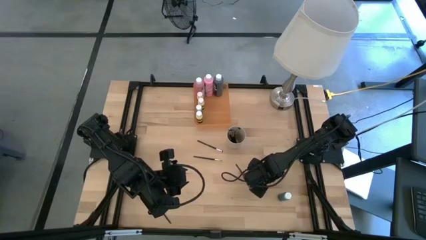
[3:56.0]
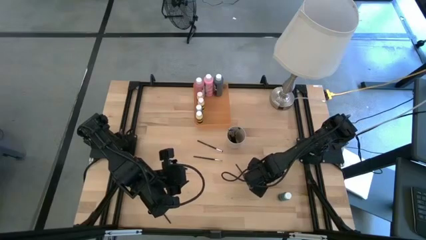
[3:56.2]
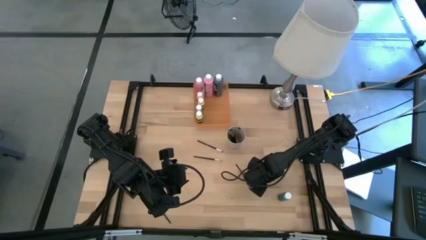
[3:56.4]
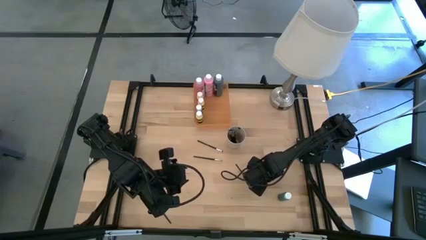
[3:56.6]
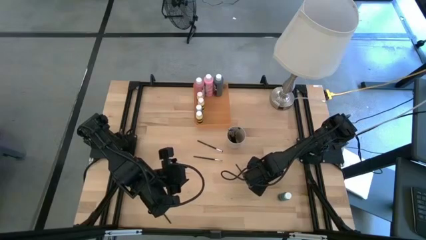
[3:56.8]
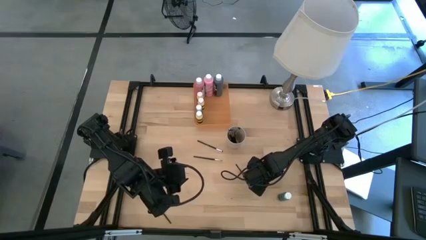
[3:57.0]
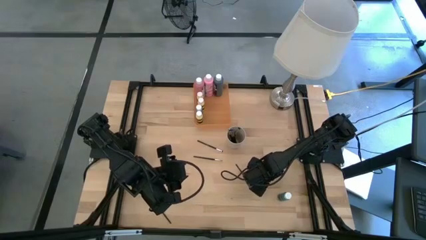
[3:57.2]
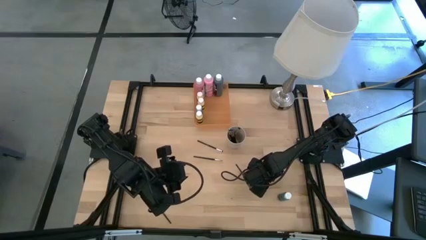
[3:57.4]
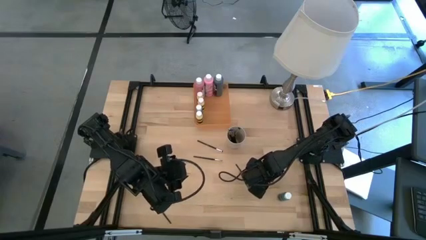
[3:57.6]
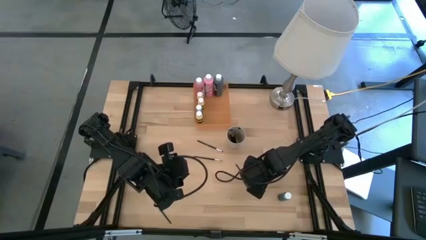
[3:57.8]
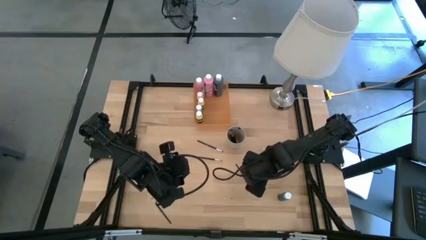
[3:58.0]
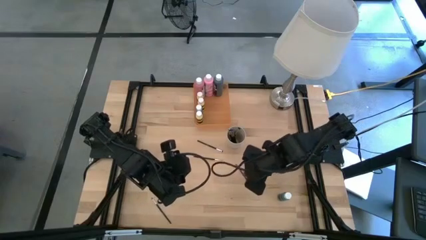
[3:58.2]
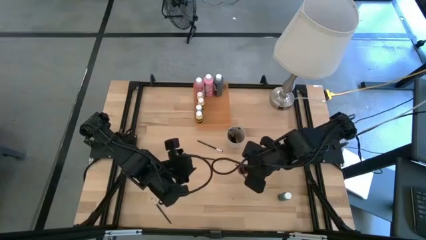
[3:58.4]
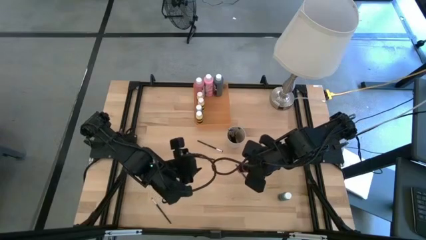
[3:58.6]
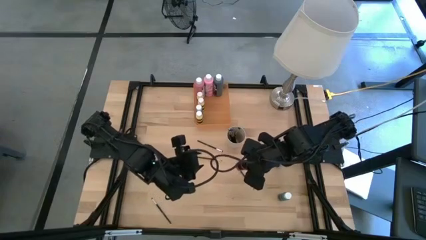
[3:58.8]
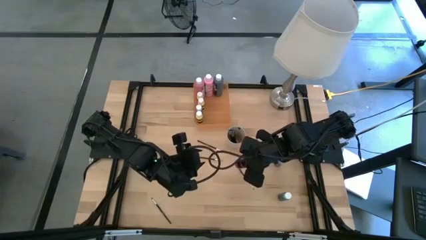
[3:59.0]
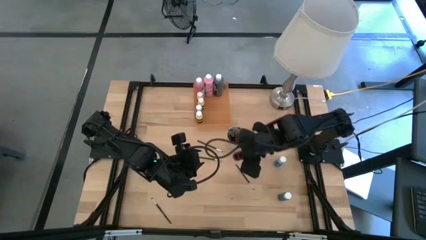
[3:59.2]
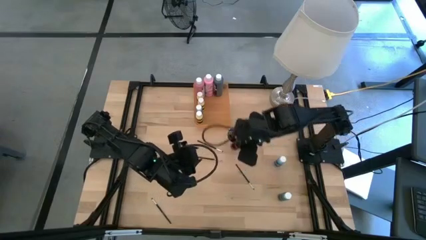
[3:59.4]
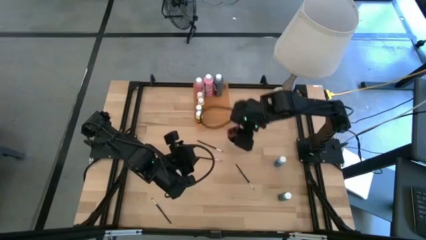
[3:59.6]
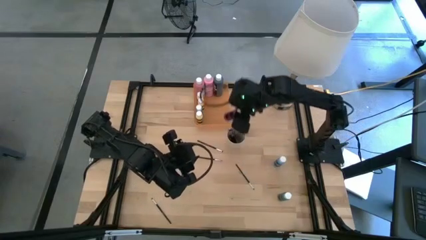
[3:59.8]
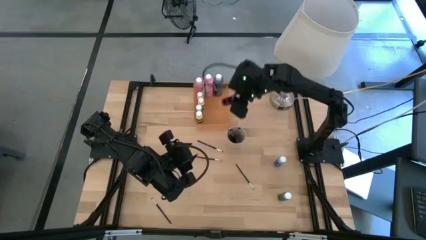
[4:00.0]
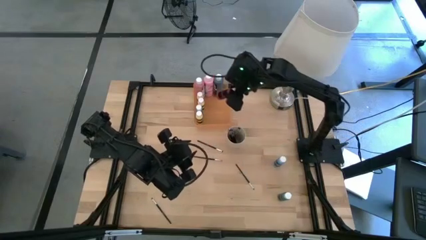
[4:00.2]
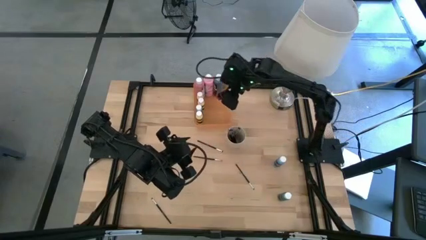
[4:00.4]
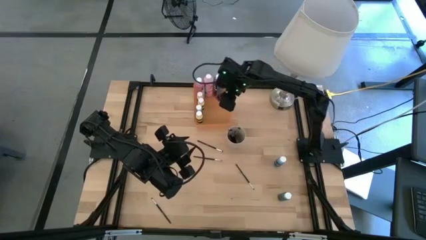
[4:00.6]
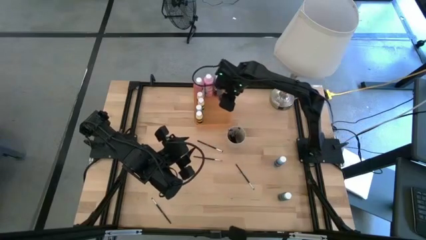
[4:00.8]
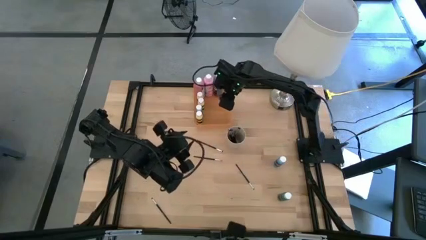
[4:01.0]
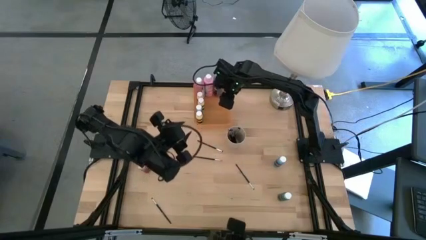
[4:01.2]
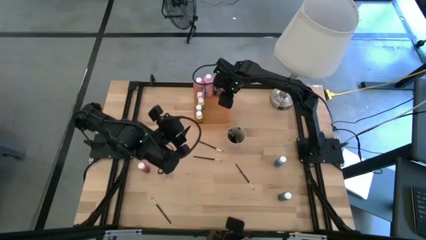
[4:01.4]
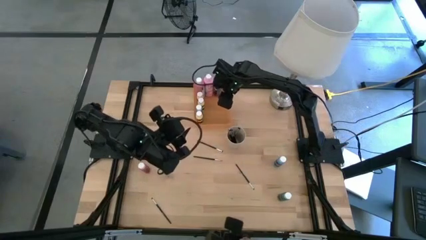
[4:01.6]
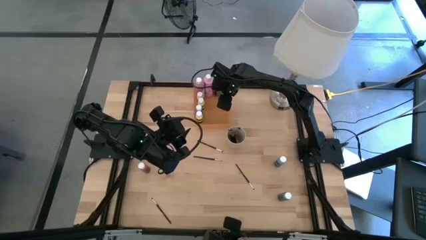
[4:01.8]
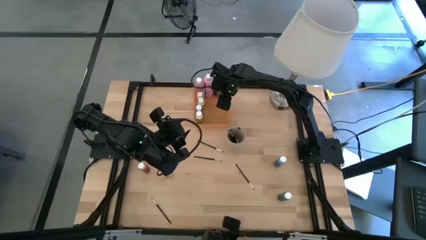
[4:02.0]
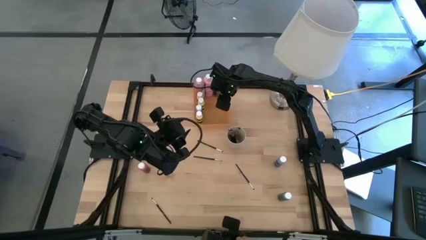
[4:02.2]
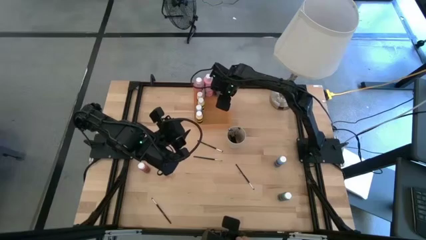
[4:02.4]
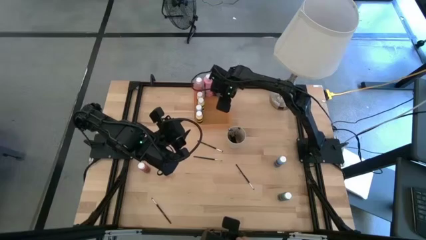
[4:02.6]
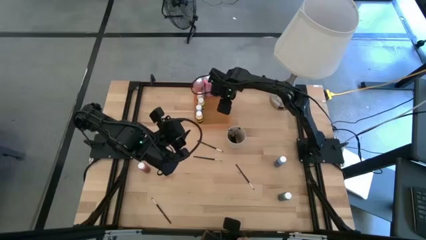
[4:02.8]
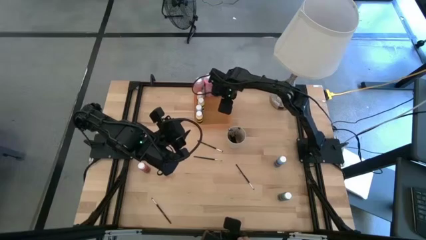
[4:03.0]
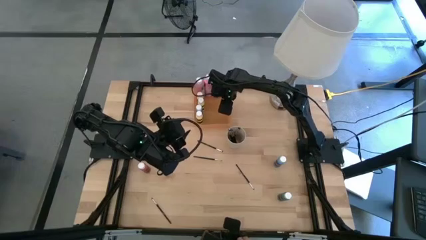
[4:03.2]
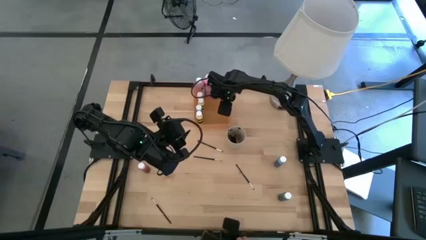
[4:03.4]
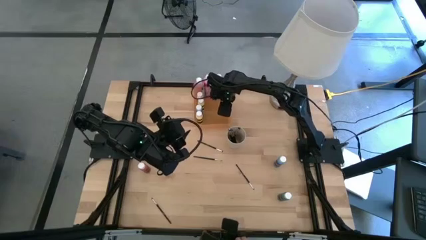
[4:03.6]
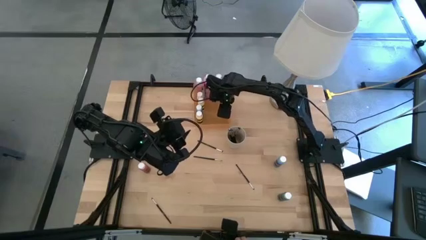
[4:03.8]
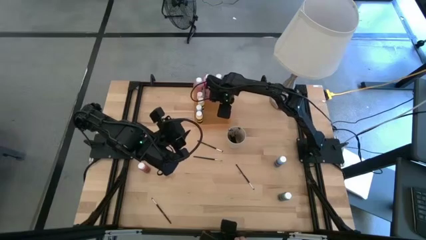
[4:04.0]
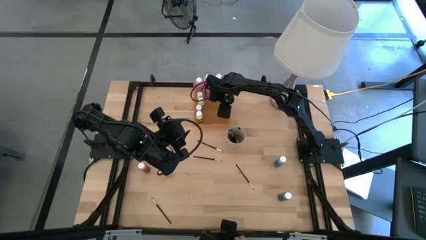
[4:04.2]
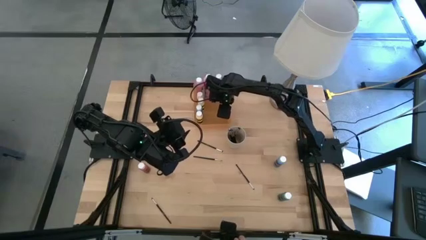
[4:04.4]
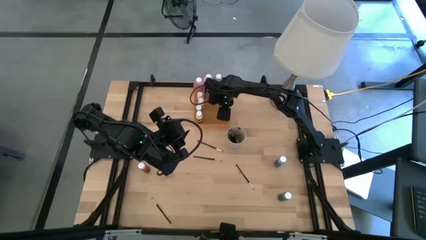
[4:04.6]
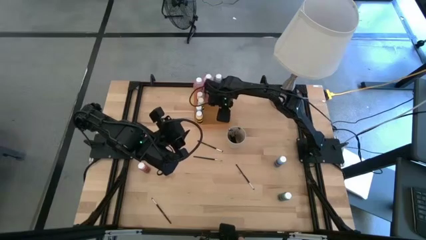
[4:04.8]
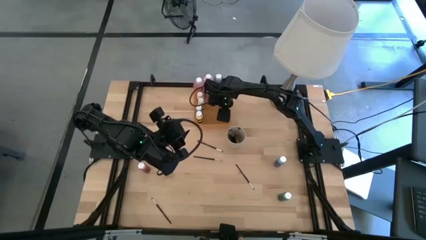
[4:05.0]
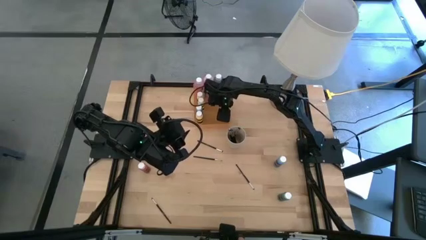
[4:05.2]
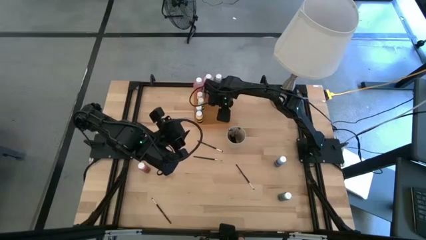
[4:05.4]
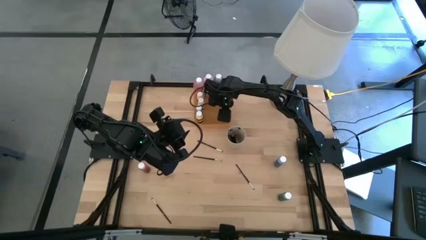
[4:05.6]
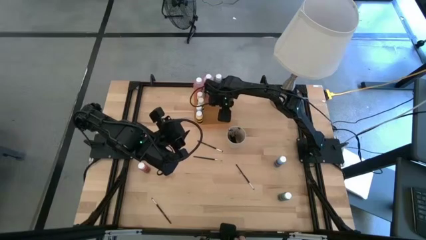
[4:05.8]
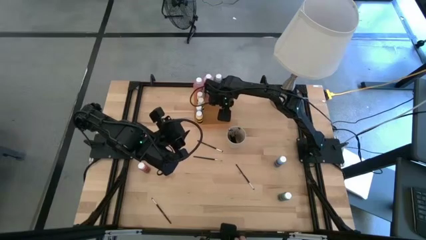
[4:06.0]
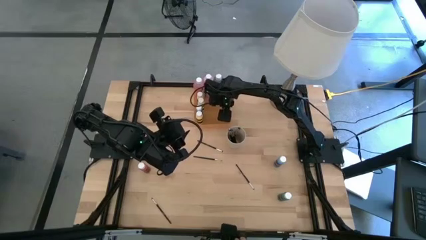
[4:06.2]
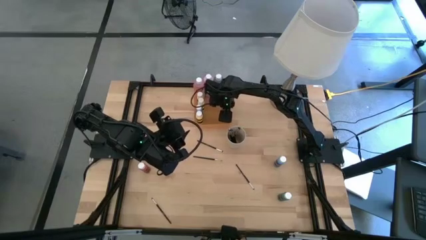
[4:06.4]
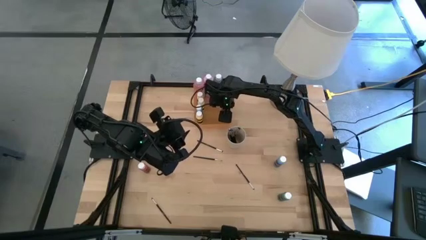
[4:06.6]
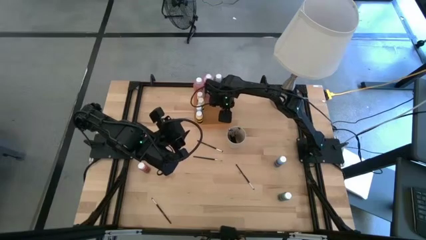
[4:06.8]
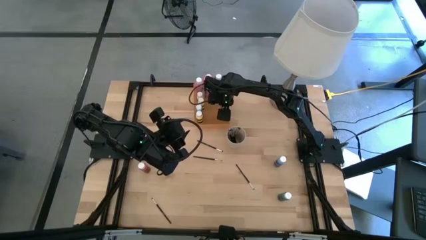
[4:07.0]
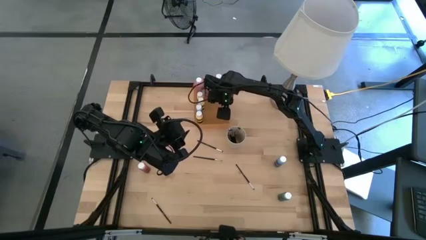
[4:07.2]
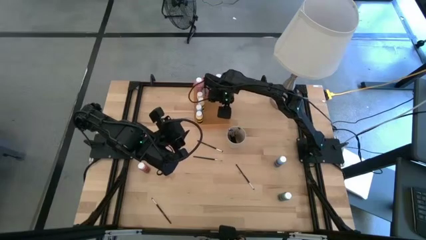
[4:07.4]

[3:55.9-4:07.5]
Task: Pick & Place Paint Supplies
Put the small pink paint bottle into the orange bin

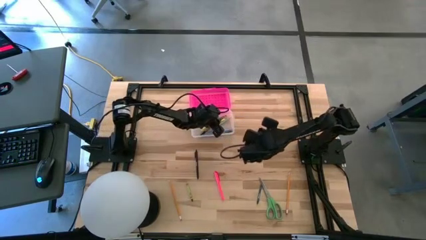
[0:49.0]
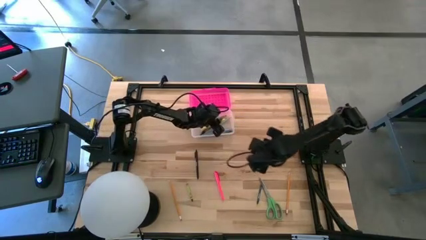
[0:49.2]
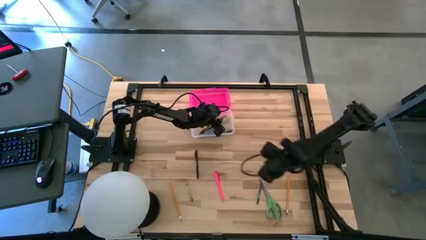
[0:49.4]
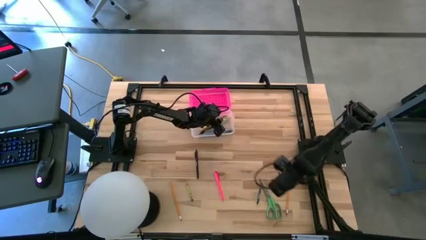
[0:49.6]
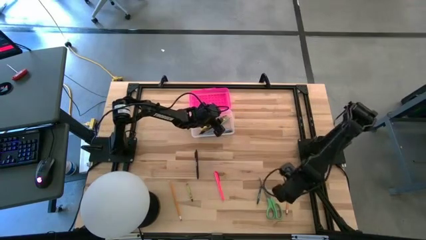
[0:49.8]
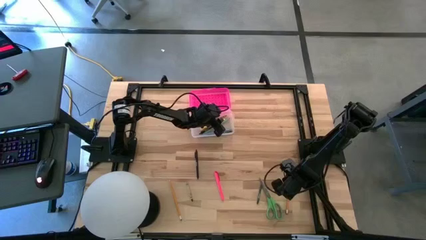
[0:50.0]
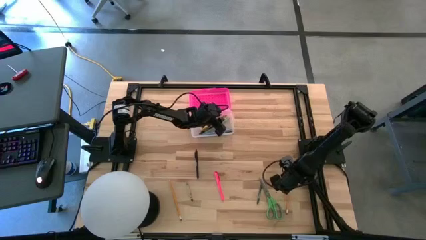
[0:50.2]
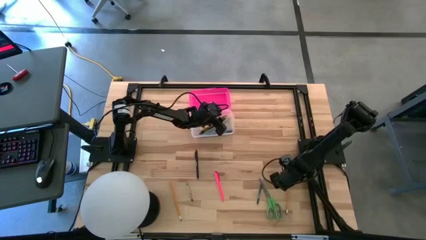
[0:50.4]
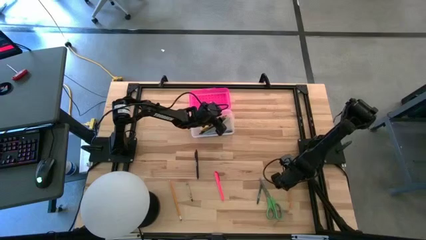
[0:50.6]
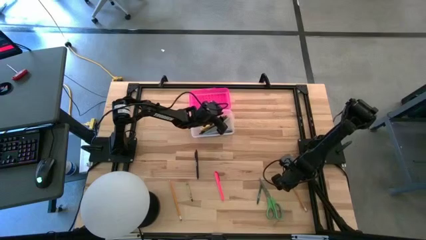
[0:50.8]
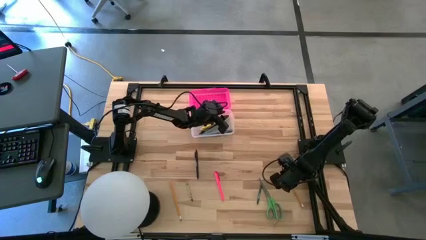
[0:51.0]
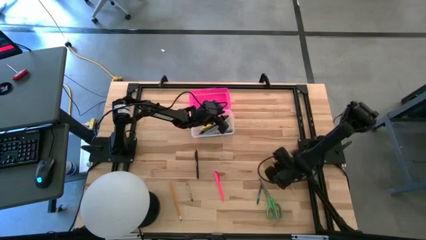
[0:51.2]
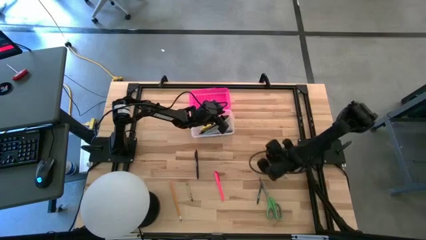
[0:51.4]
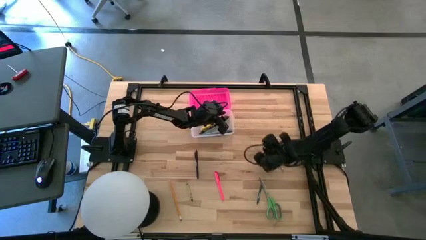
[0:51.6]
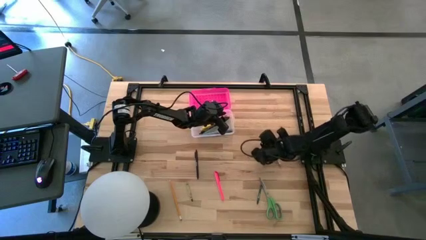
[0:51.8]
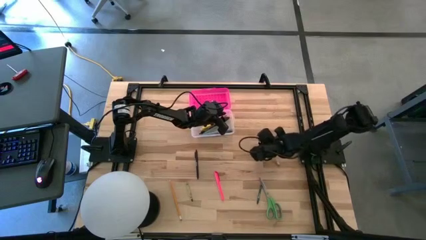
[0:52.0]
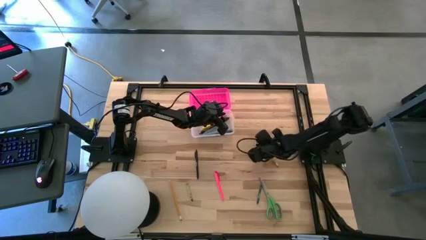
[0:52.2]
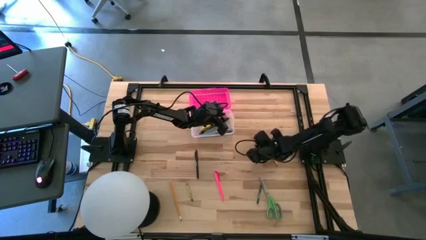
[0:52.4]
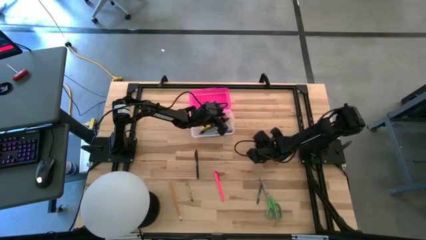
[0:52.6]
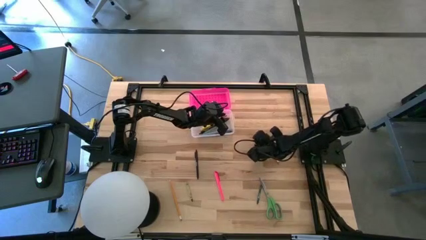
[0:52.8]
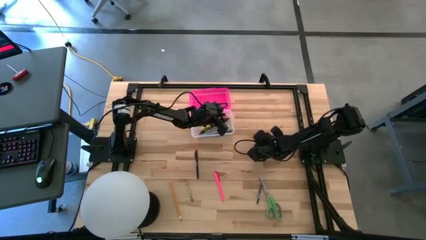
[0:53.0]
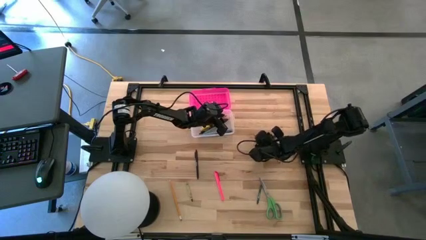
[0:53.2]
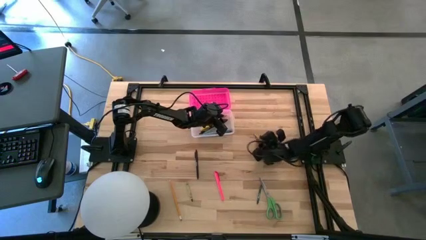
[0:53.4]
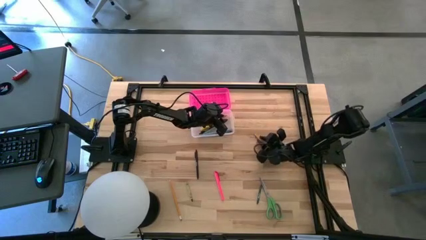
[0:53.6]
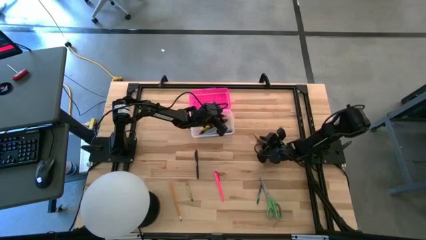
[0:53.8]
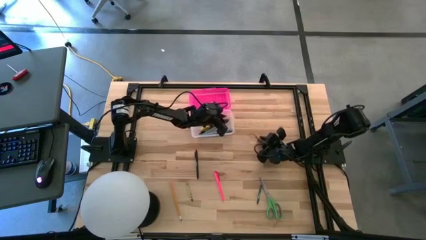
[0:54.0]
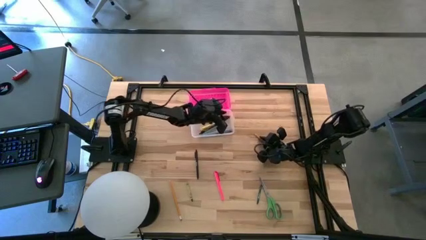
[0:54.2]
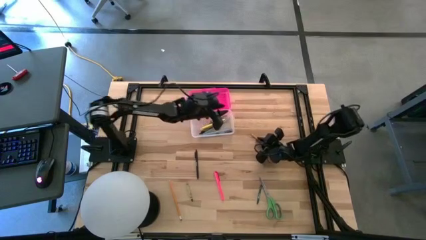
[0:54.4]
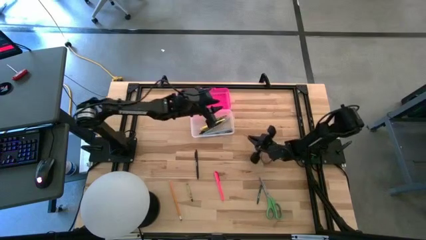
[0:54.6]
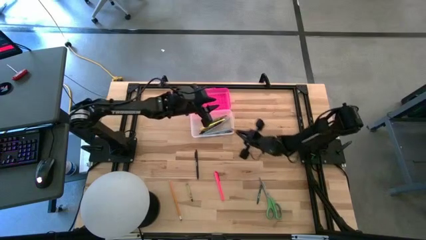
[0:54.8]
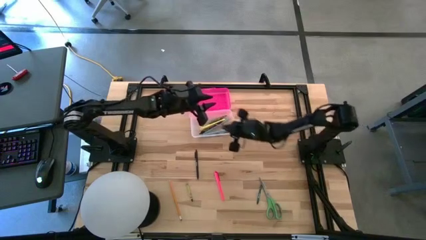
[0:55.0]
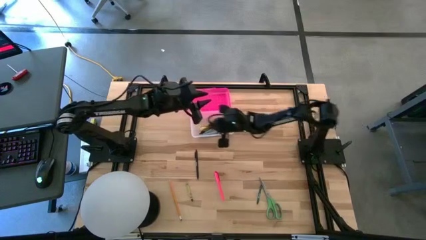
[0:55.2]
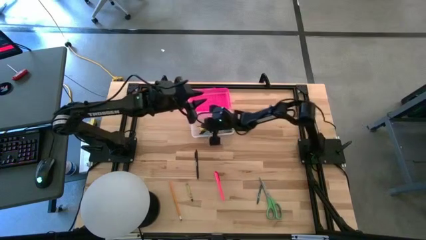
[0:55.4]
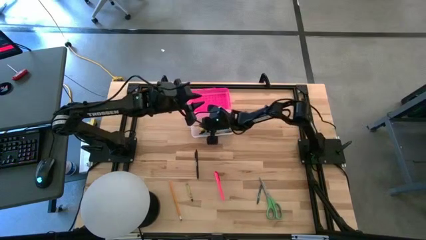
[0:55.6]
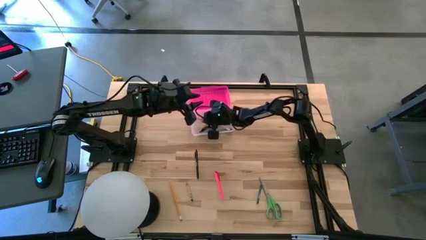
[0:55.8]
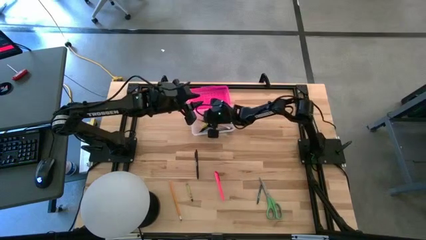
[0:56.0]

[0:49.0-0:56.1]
Task: Pick & place school supplies into a supply box
Put the orange pencil into the pink supply box
